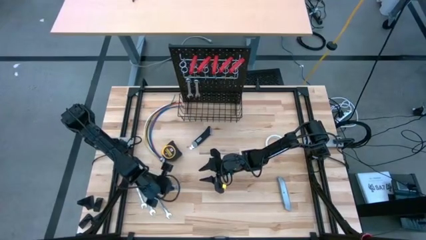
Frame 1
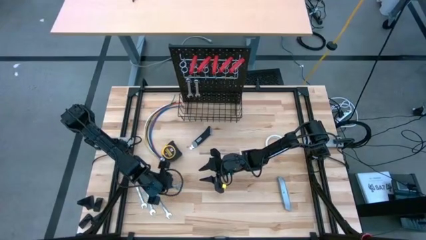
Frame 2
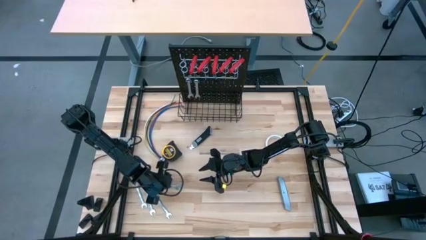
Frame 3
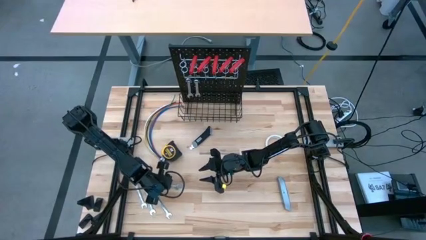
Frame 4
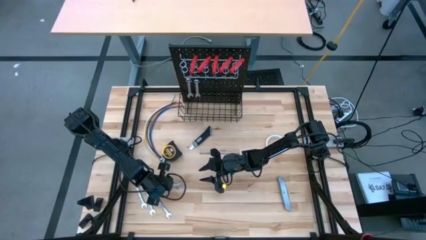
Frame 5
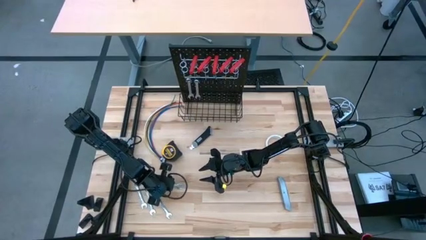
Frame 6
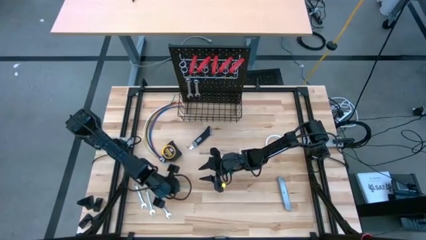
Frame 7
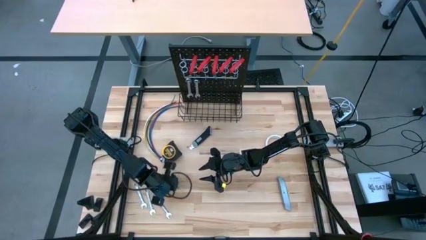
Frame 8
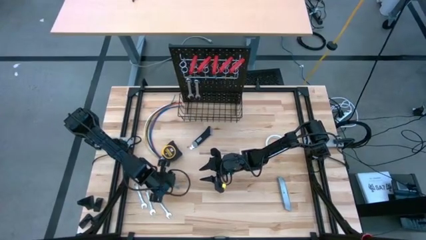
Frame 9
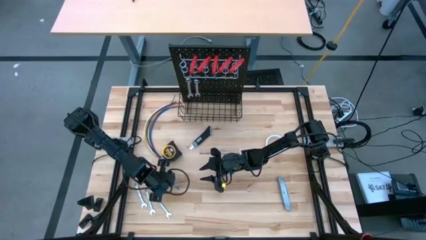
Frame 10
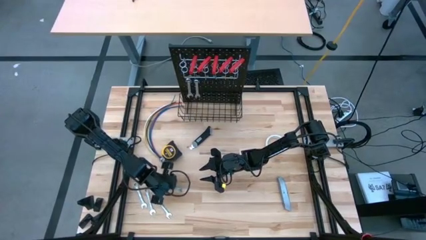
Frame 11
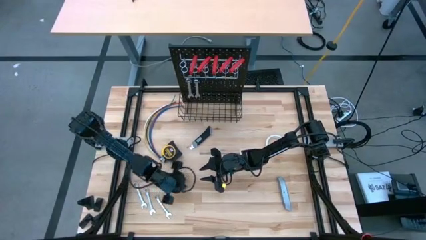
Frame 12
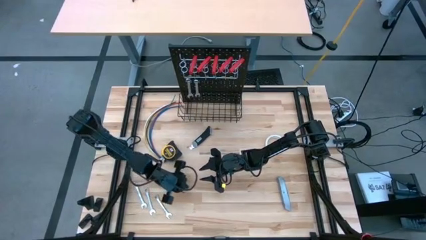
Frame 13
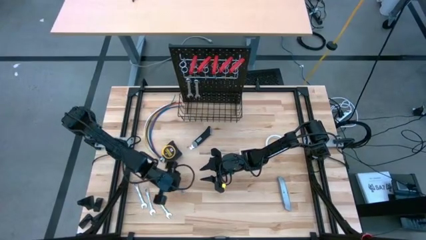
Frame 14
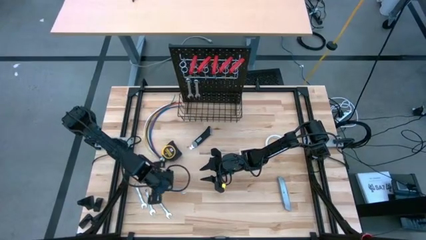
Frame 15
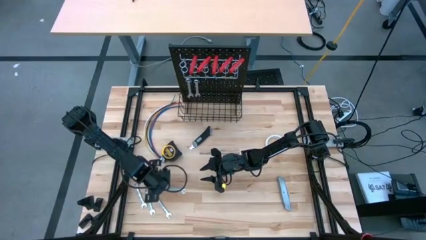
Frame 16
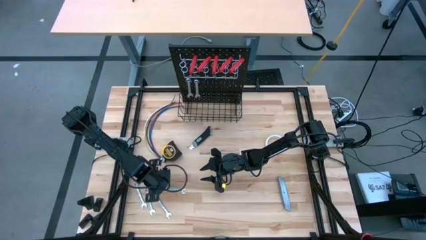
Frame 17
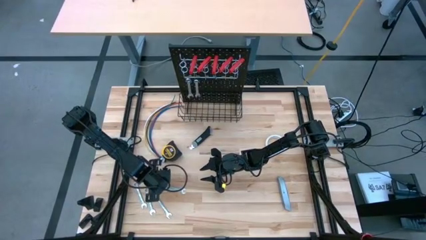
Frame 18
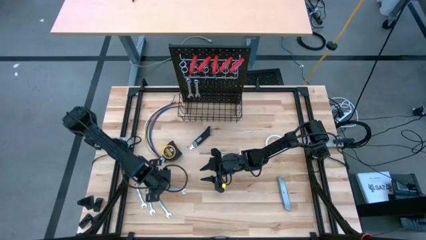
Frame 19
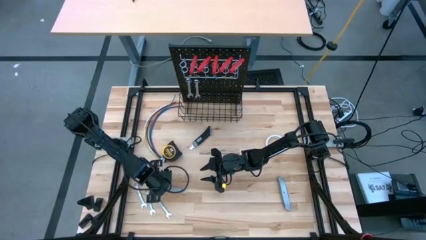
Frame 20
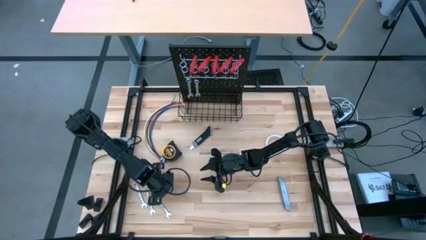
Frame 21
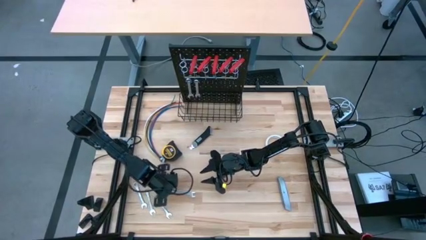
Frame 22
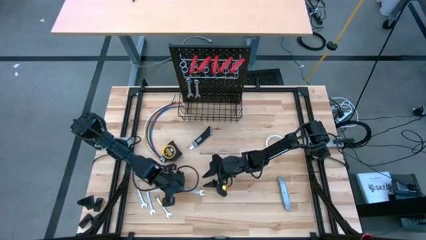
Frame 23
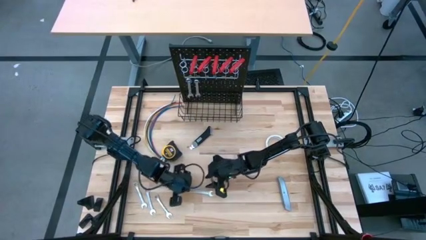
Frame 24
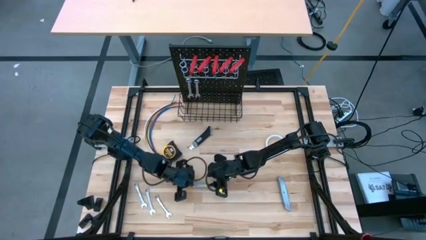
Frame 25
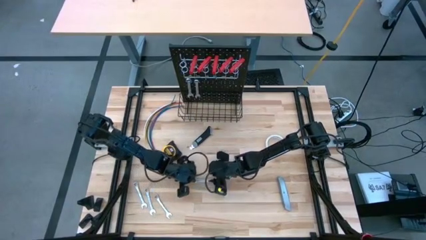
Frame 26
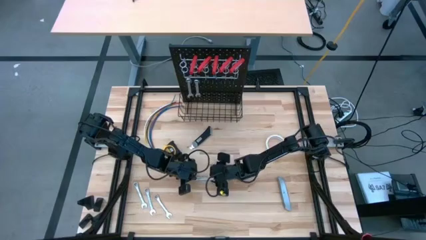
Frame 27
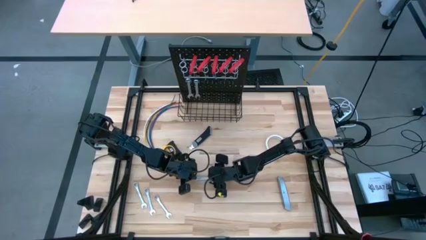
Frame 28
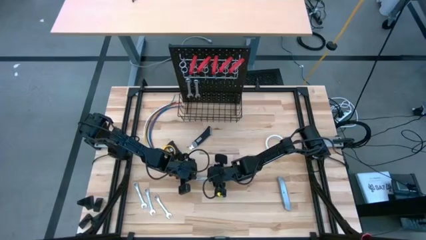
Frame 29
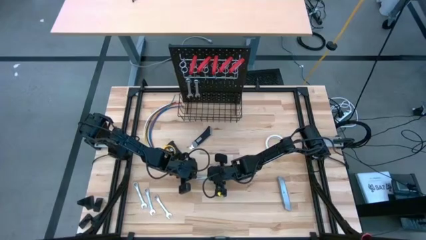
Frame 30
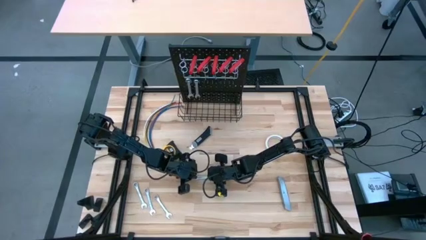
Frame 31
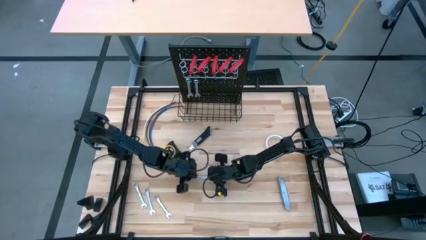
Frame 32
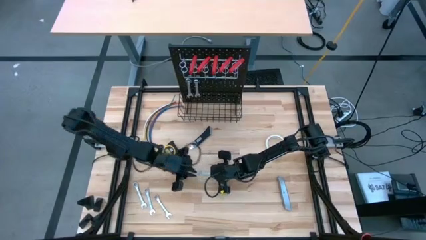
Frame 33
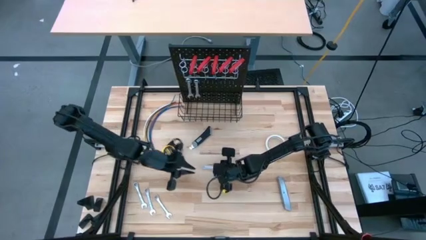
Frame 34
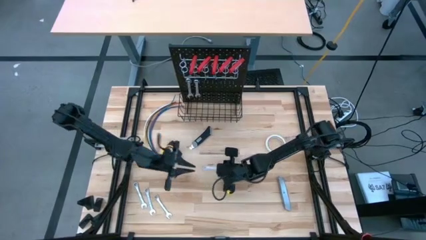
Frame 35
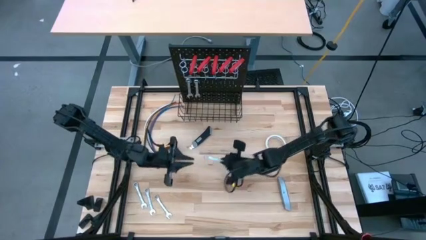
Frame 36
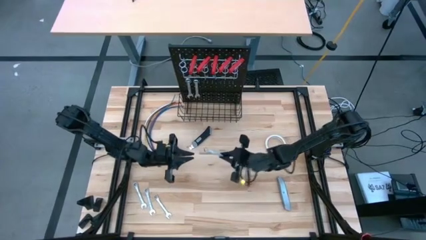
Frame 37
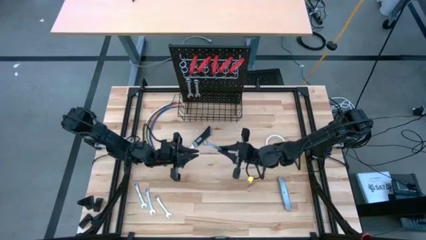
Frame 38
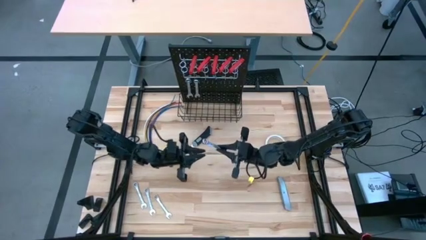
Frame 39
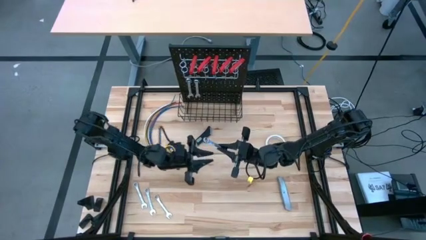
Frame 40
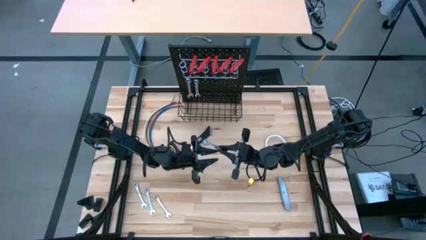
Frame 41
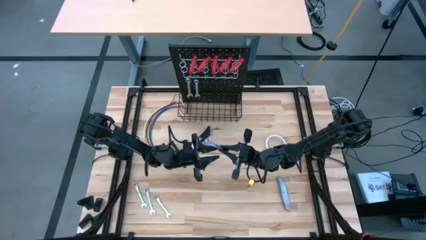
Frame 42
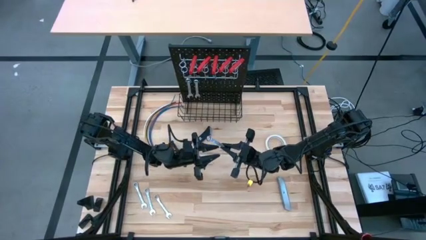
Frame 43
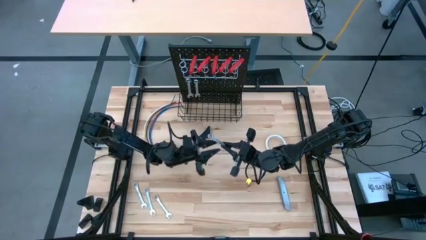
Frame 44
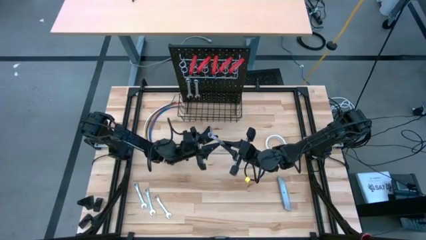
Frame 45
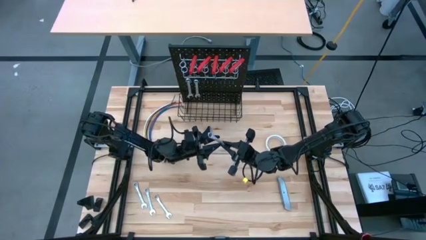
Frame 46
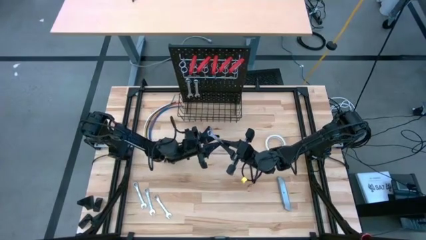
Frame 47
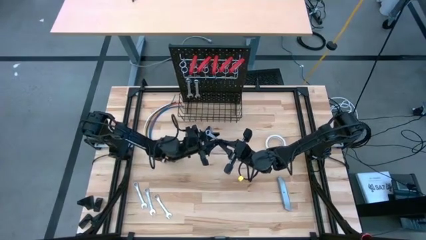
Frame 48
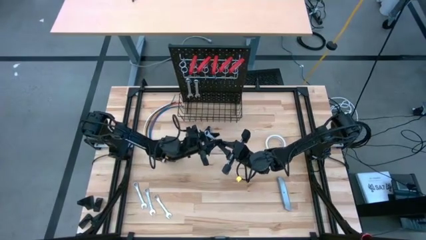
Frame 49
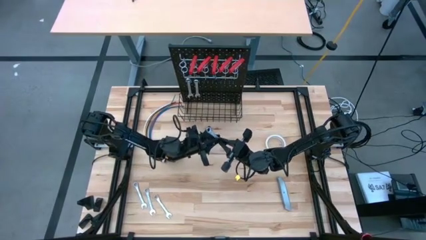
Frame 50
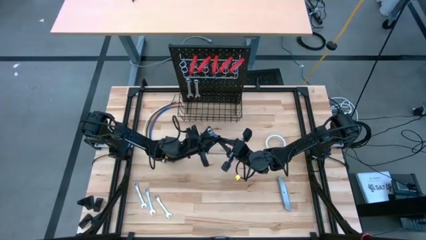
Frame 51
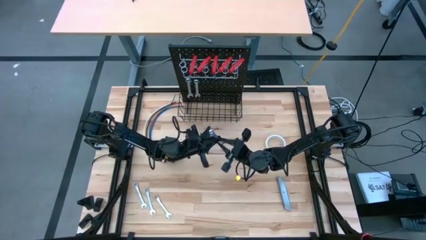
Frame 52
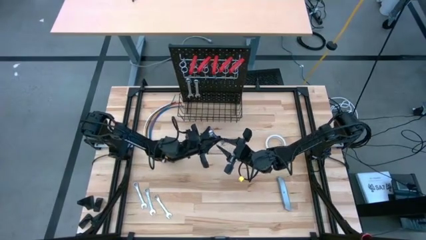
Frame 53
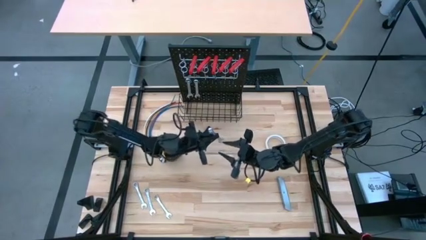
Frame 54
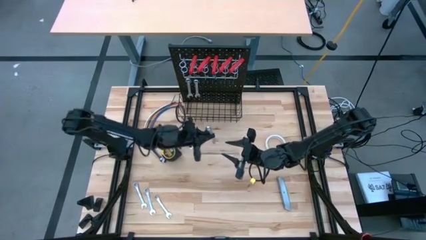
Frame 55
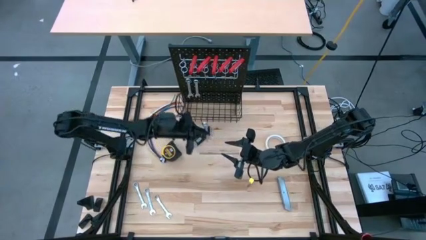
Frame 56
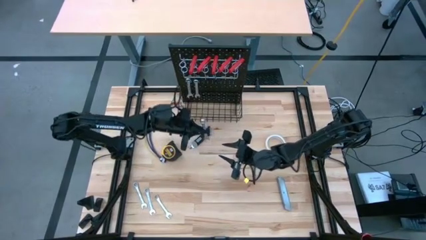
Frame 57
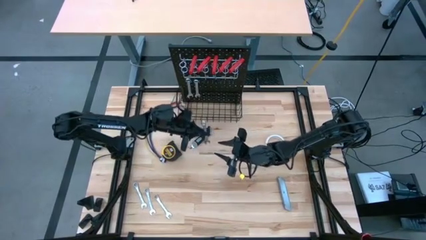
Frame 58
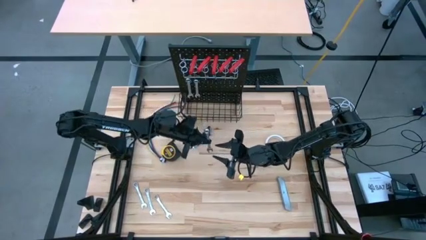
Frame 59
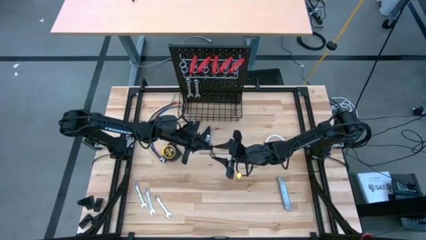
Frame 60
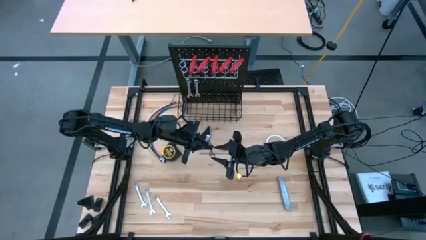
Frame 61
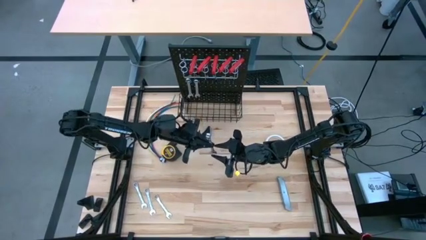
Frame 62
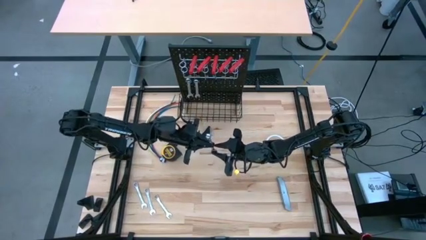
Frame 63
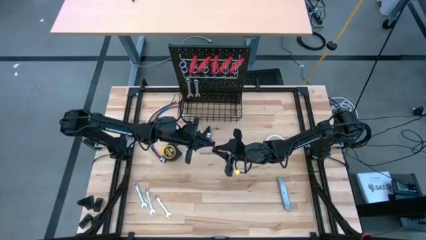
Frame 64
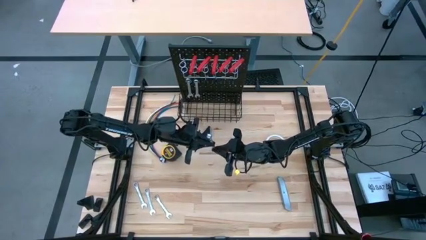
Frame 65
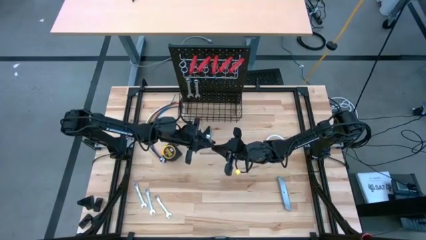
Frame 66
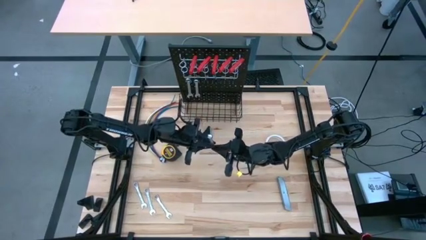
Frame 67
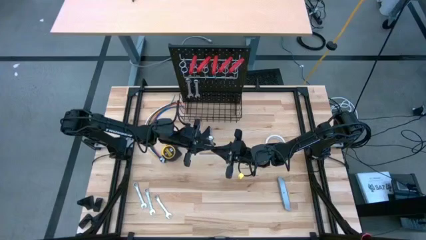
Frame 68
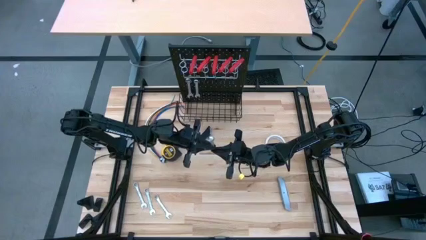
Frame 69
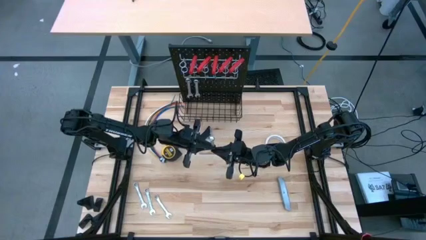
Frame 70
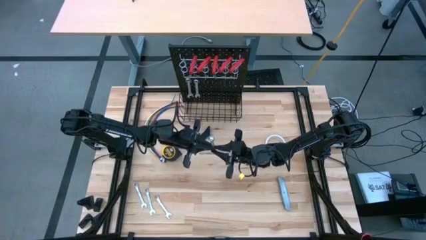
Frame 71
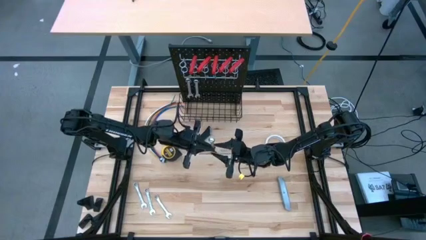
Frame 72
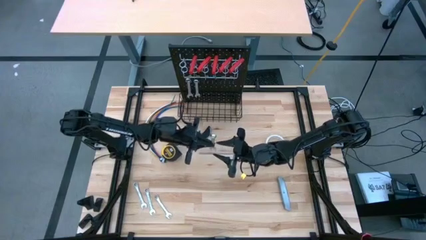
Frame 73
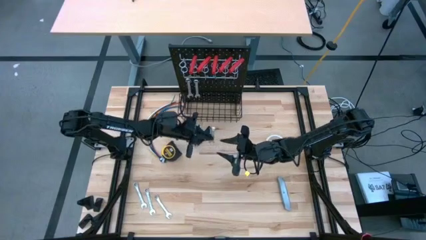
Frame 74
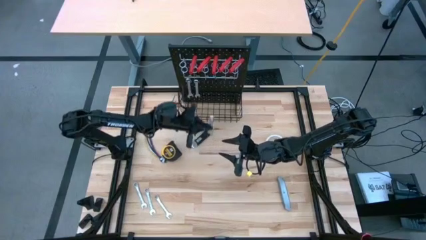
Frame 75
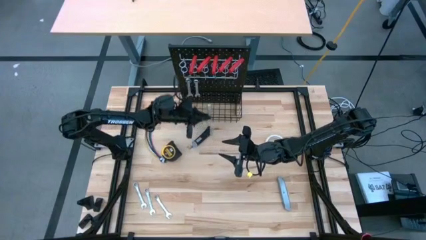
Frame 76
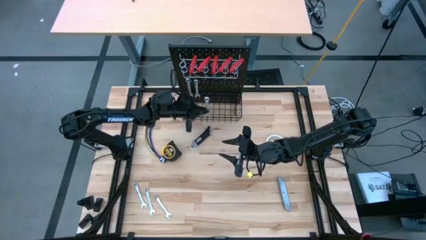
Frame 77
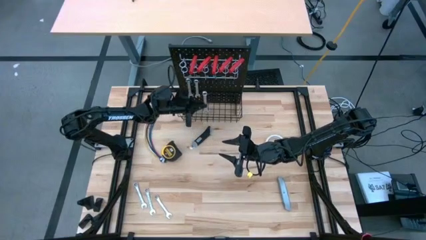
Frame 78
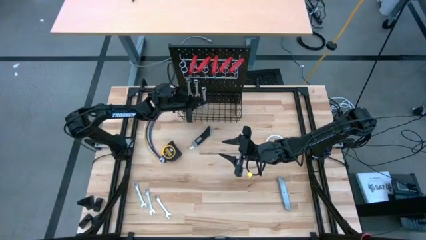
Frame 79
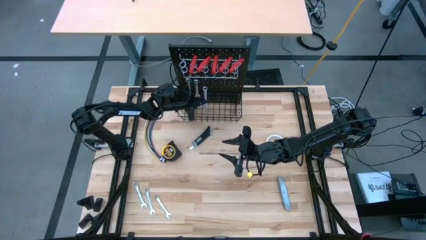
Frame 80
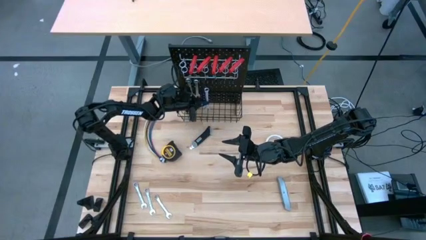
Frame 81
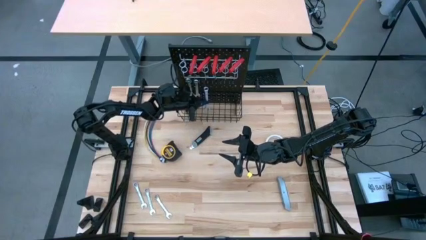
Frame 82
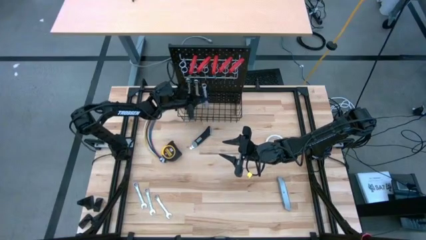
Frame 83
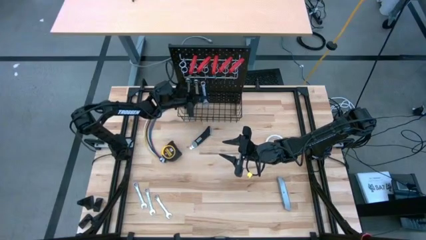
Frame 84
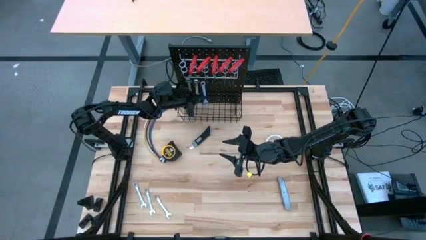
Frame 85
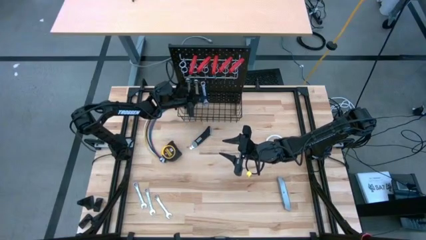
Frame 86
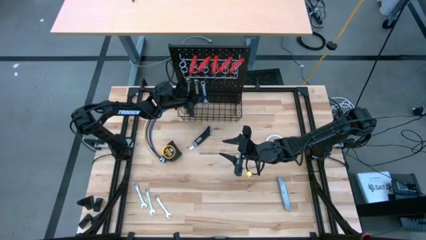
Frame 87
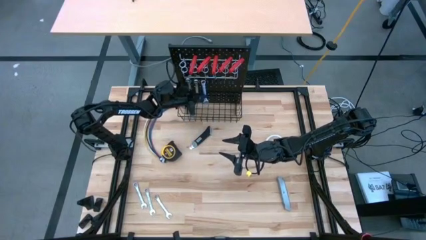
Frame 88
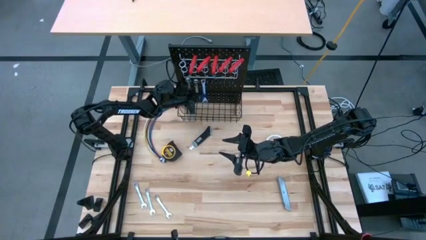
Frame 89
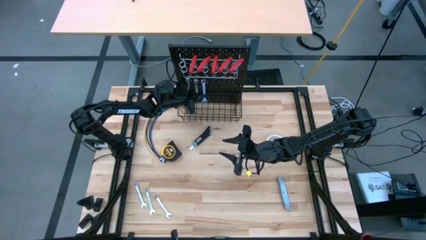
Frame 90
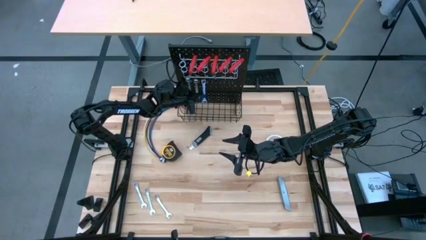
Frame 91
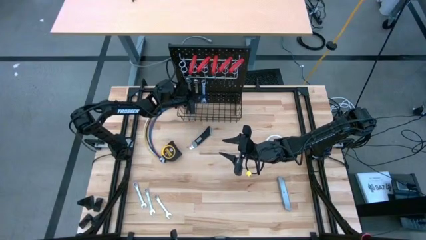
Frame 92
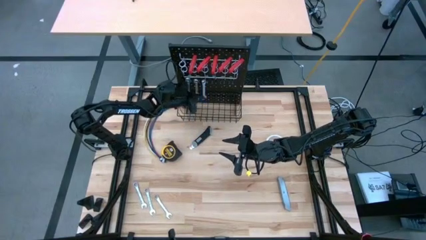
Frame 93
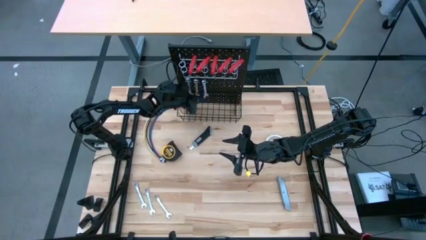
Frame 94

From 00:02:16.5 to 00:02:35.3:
Task: Hang tools onto peg board
Hang the wrench on the peg board
